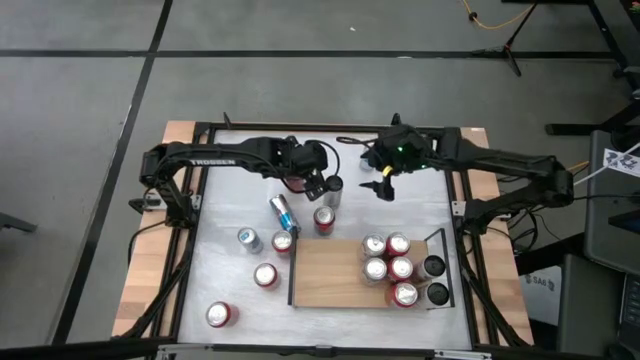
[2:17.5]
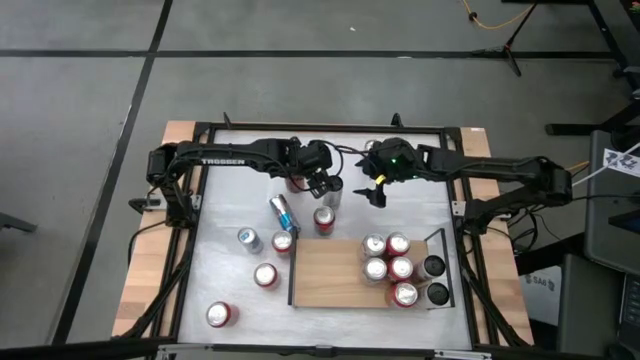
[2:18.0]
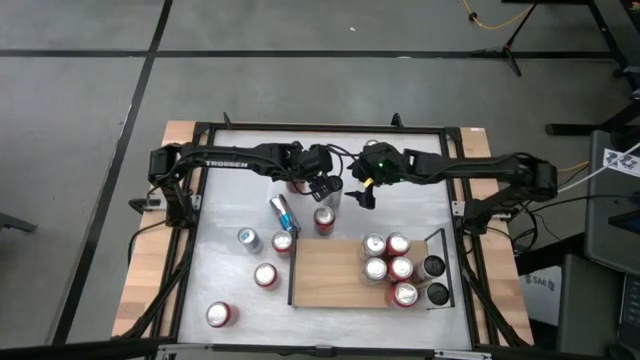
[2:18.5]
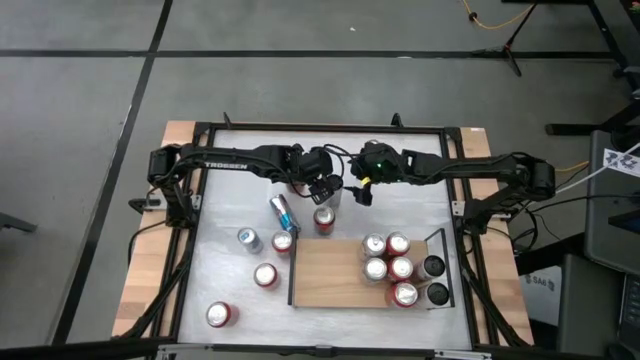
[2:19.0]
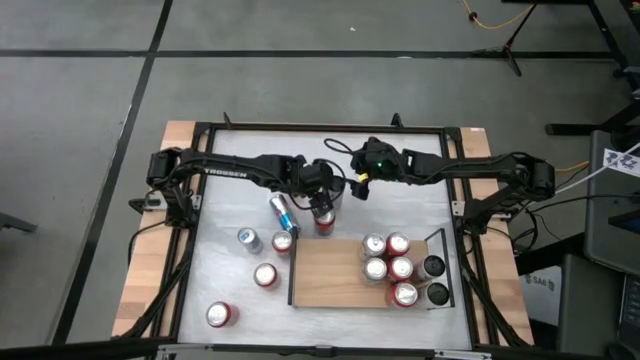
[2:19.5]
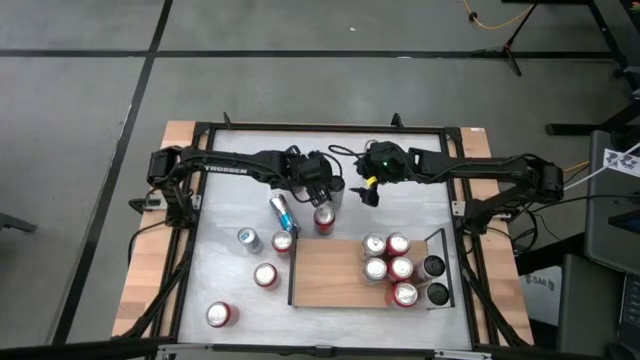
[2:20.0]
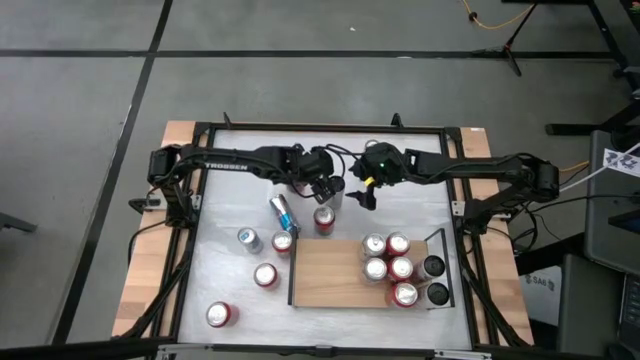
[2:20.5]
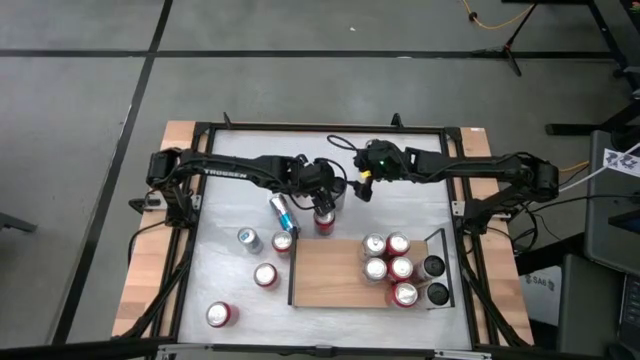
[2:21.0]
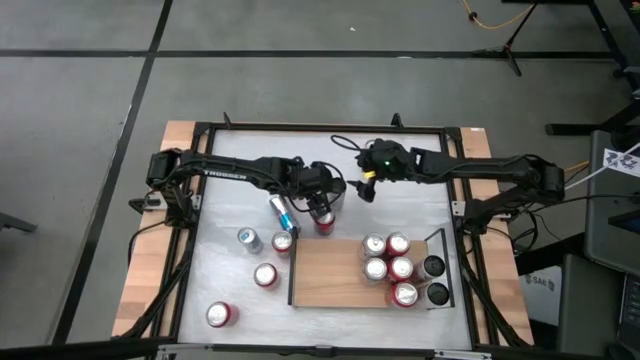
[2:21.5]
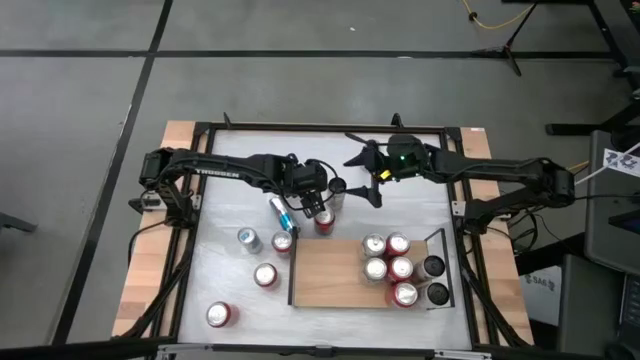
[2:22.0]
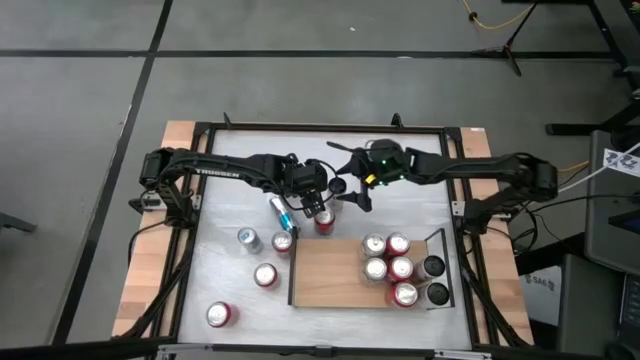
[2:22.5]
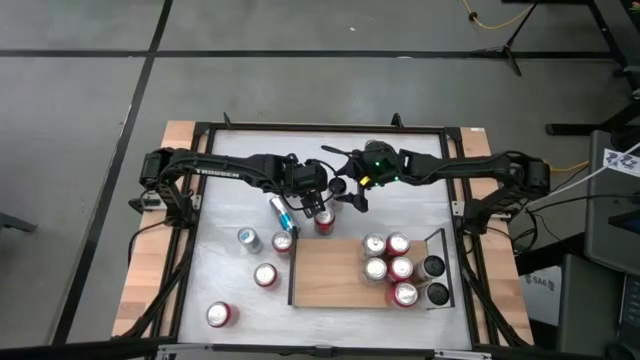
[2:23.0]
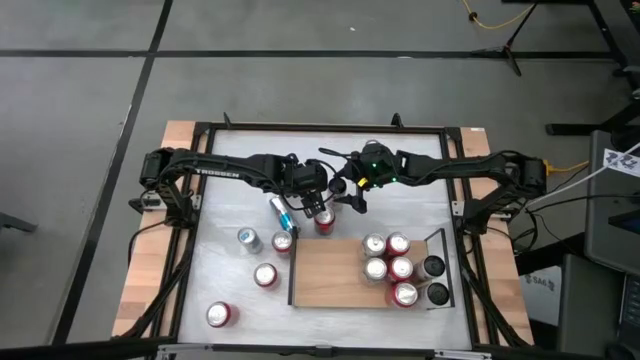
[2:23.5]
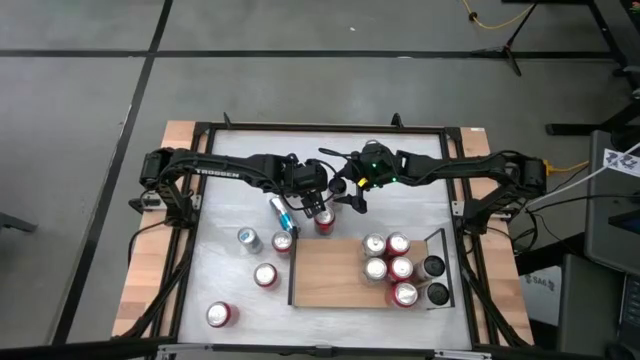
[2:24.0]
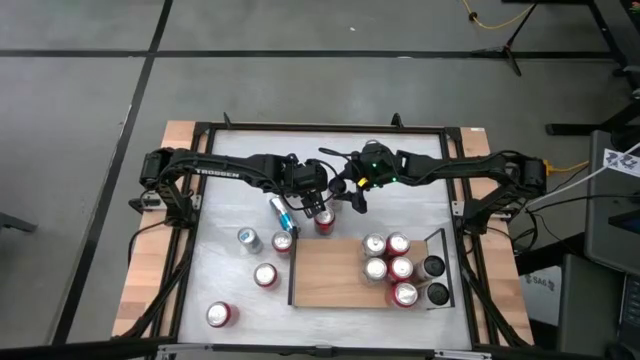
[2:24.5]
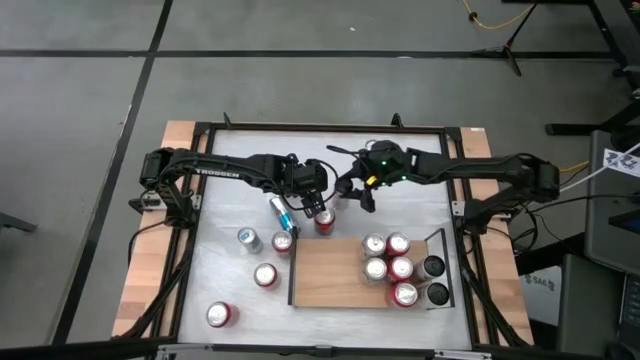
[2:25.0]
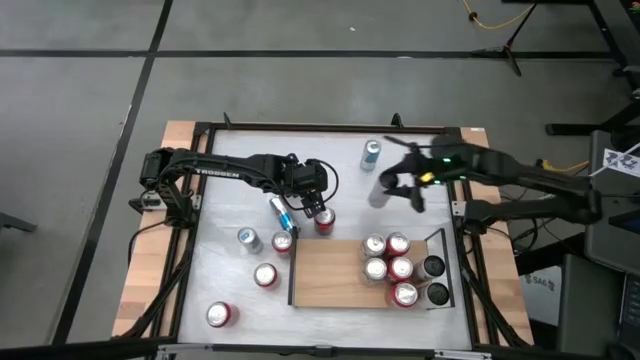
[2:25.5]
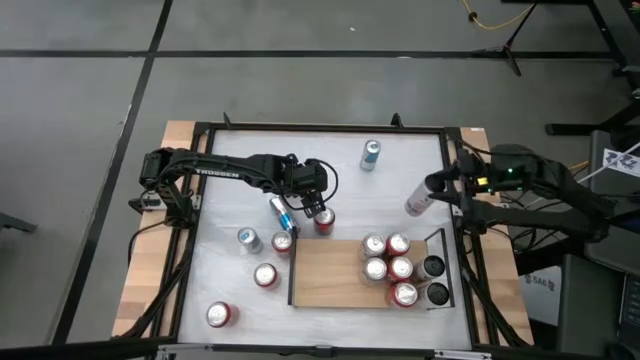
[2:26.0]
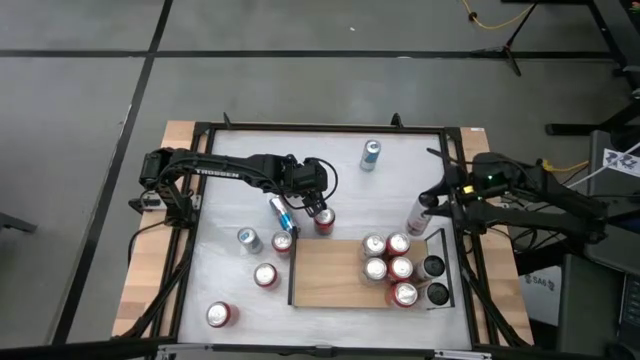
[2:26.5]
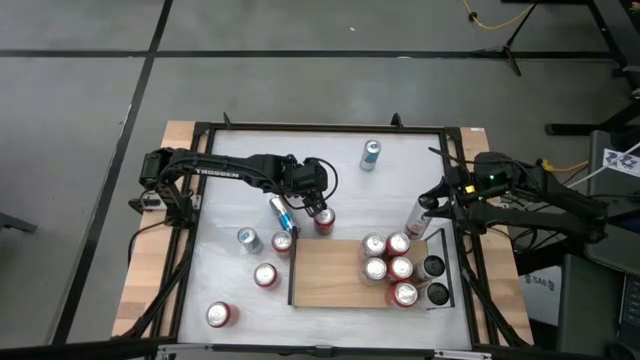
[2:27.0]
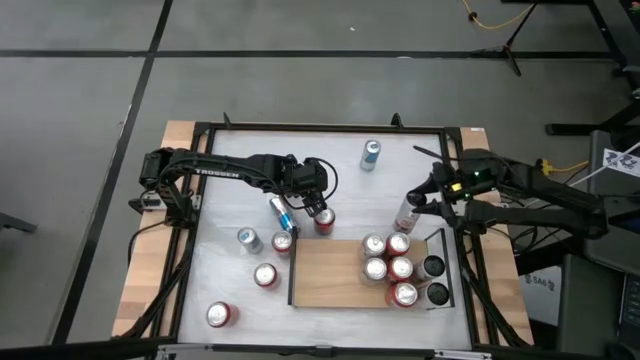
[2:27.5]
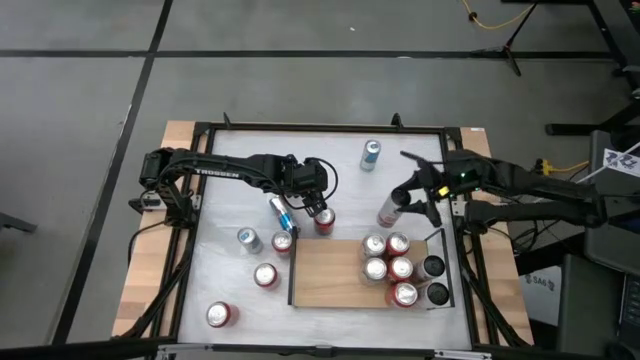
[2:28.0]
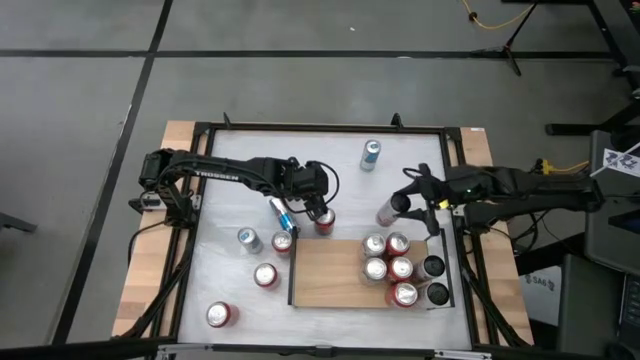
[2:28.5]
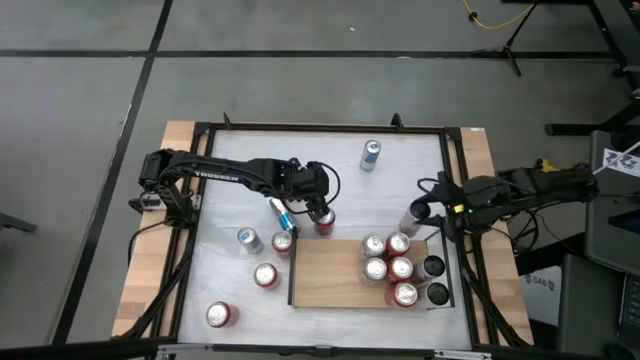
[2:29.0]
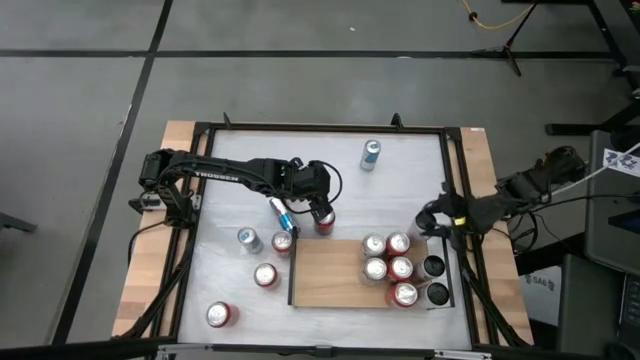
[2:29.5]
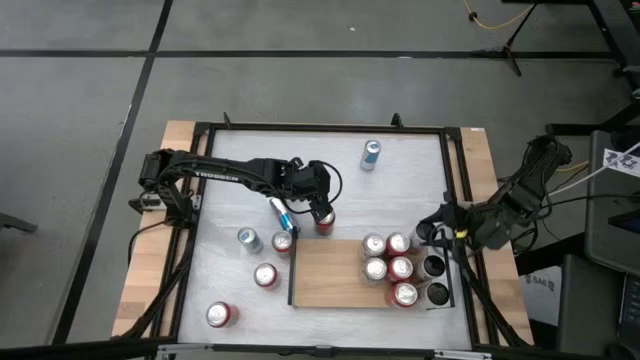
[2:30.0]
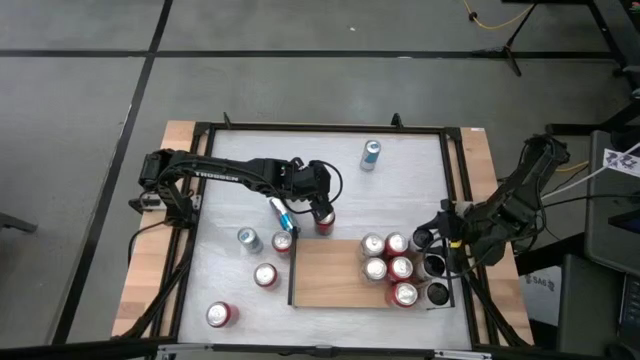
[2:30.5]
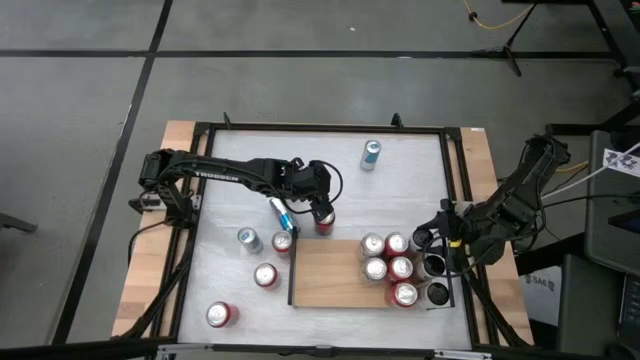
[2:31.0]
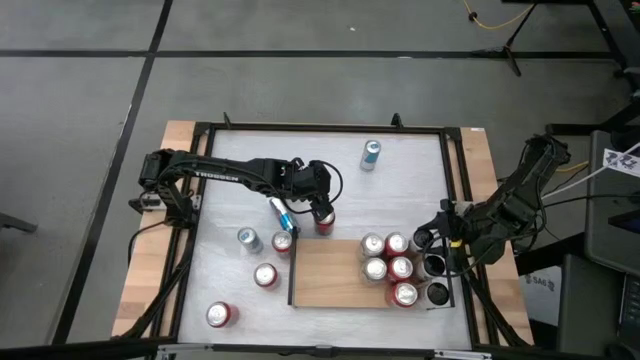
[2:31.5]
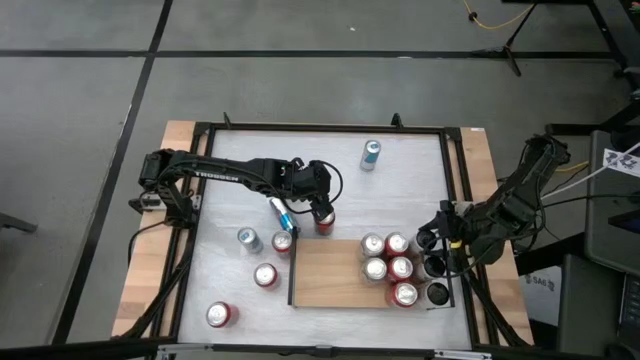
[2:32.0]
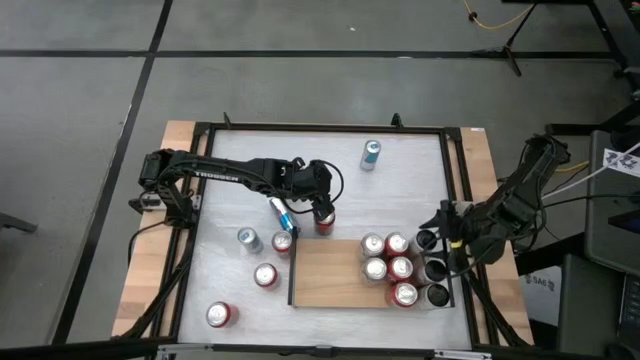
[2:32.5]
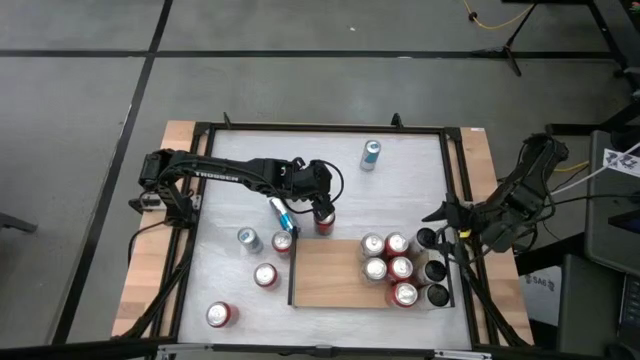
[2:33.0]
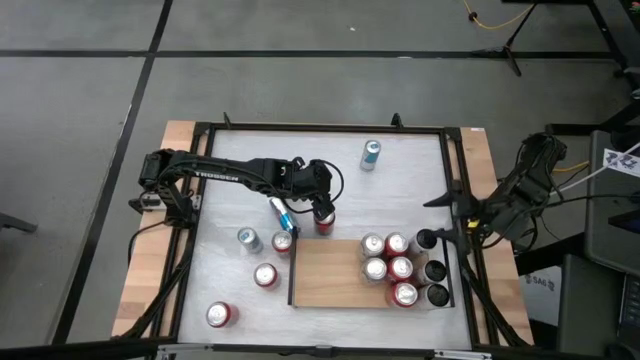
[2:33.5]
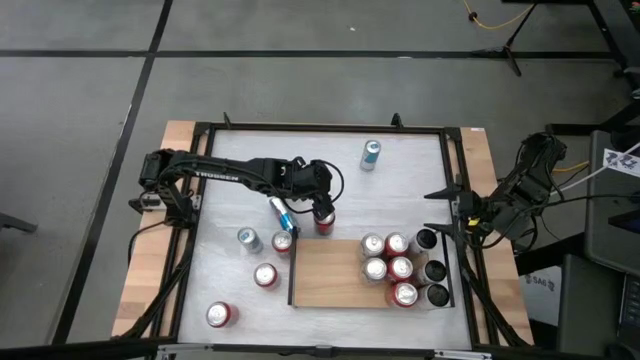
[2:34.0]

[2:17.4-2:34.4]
Task: Place canned beverage on shelf
Put the black soda can on the shelf

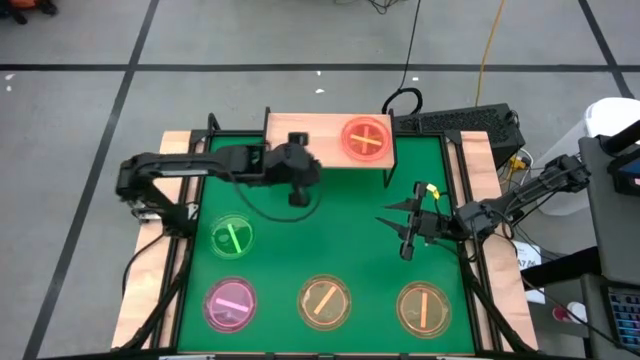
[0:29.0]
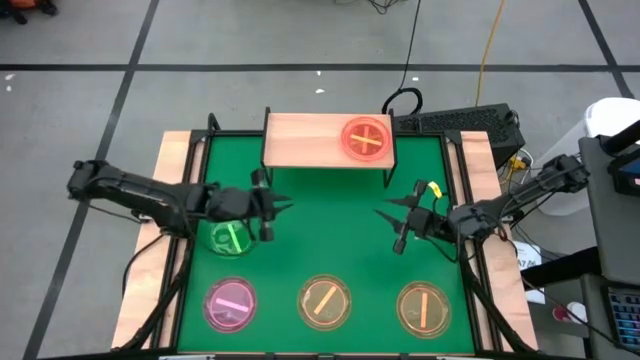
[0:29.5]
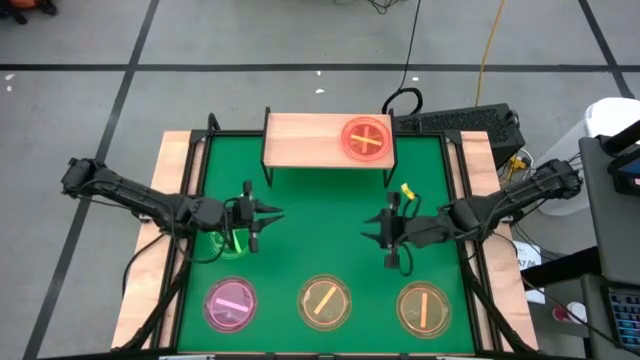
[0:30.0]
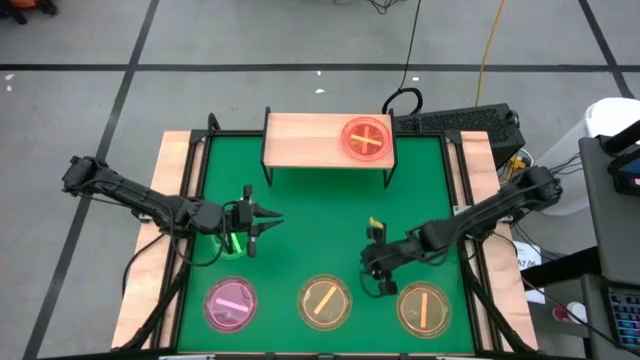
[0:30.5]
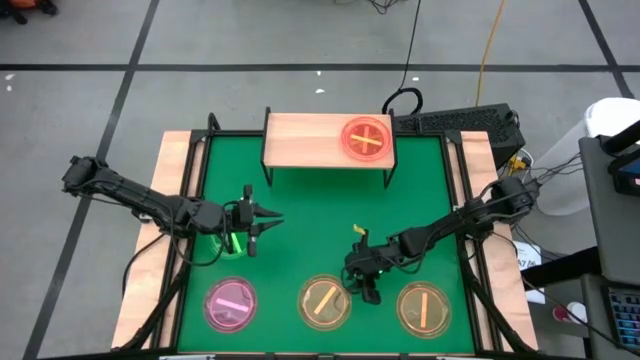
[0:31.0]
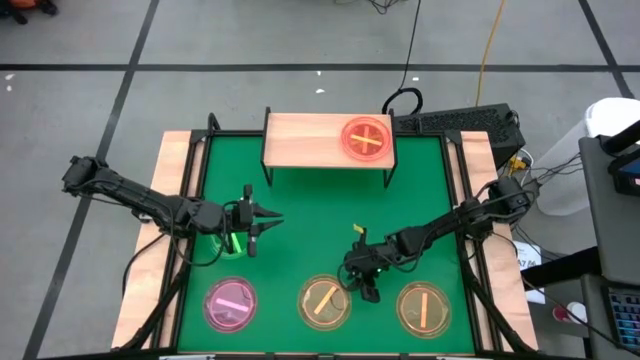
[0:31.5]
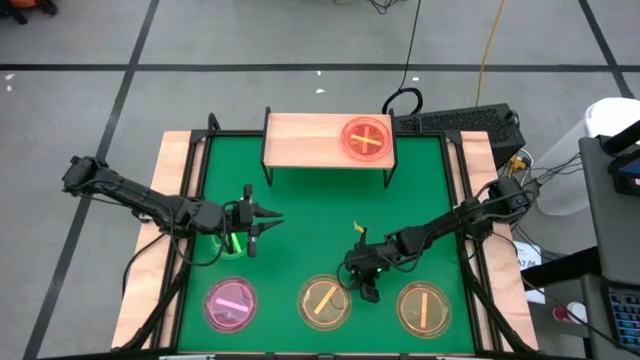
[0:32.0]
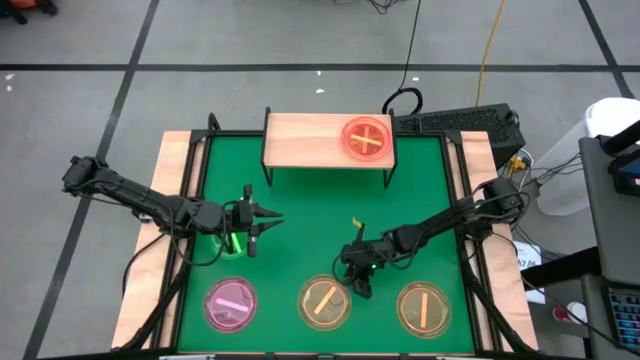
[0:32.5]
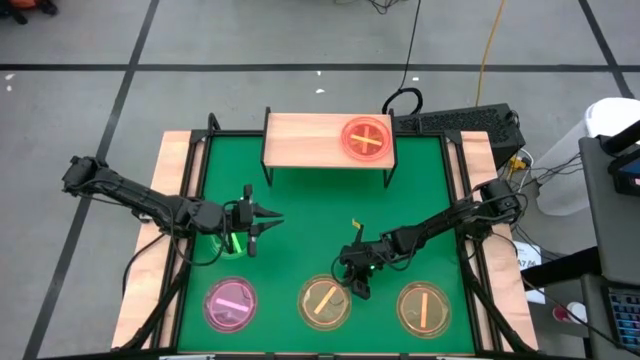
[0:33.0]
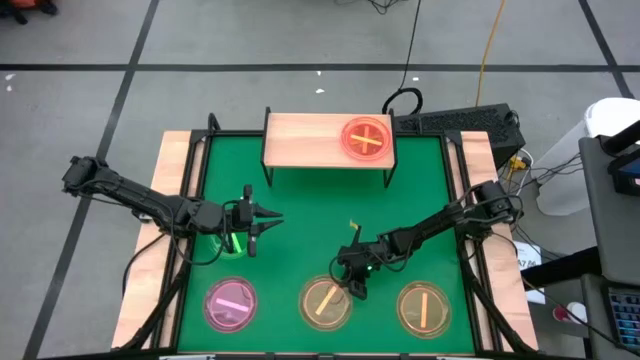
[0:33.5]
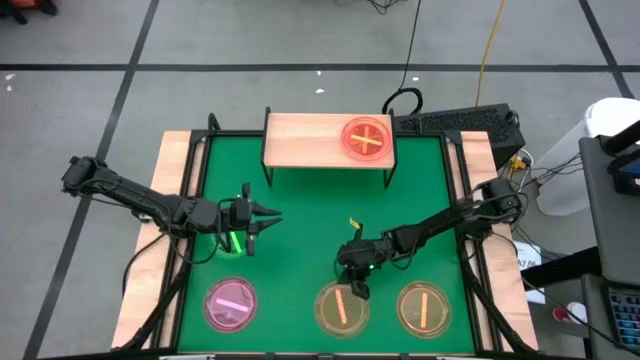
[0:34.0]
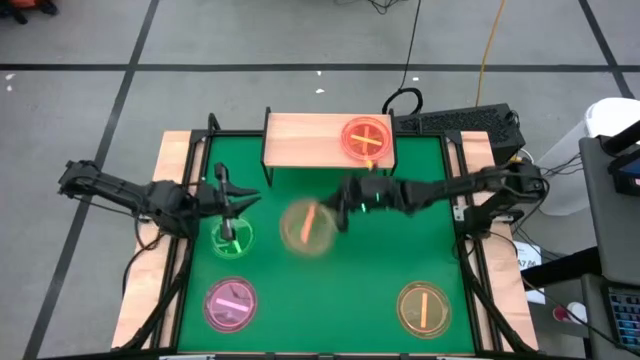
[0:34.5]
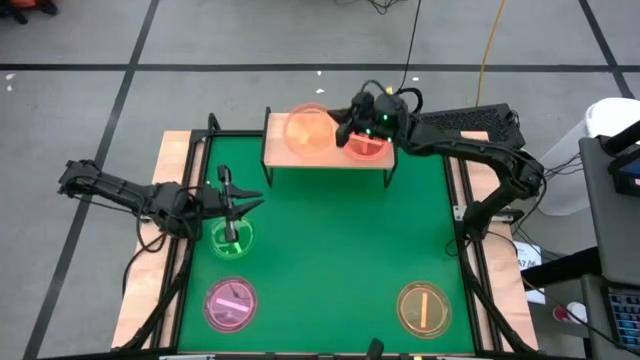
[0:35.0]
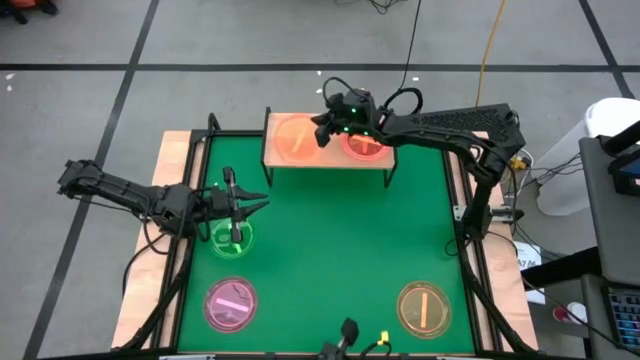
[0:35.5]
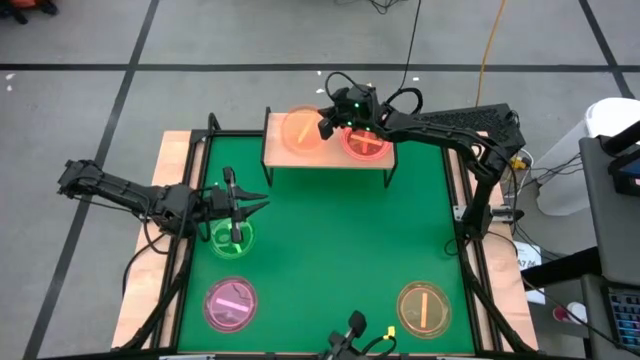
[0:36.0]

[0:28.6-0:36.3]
Task: Place and stack plates onto a shelf
Put the left orange plate on the shelf
